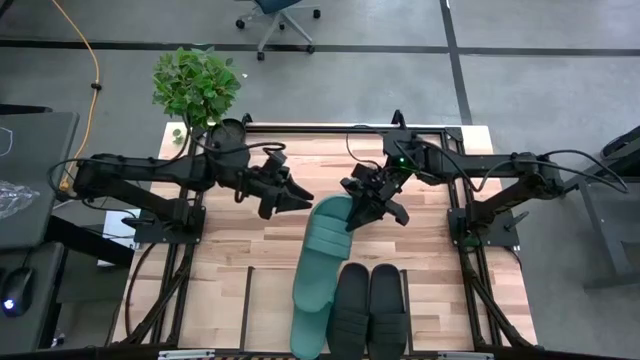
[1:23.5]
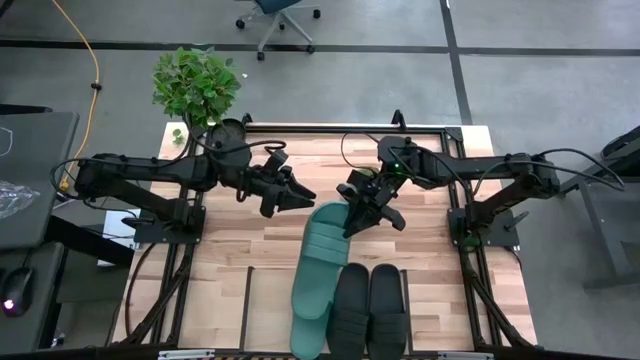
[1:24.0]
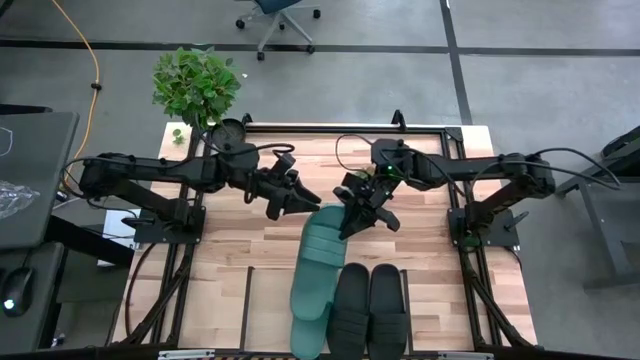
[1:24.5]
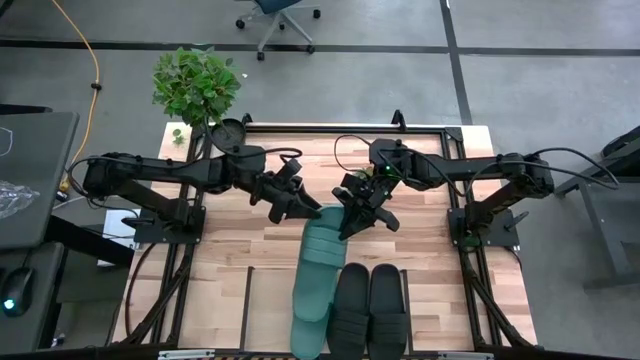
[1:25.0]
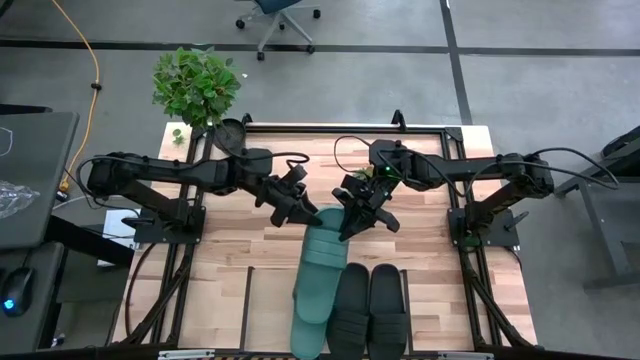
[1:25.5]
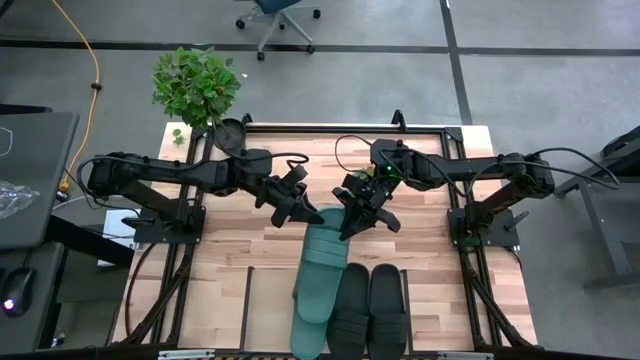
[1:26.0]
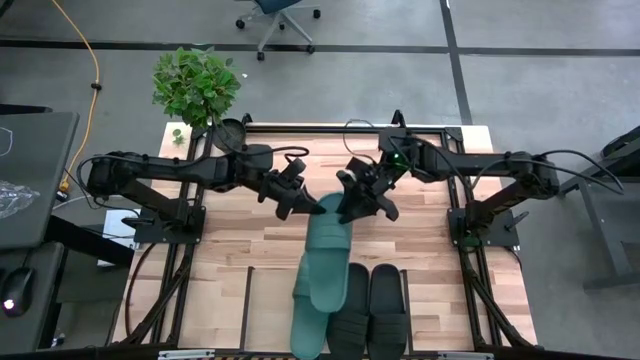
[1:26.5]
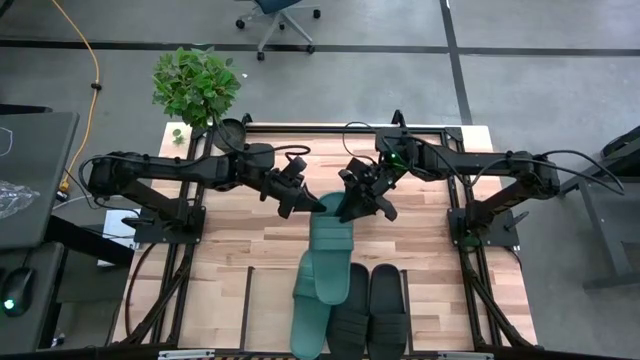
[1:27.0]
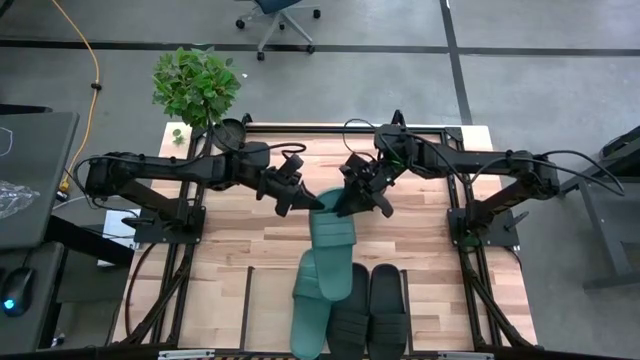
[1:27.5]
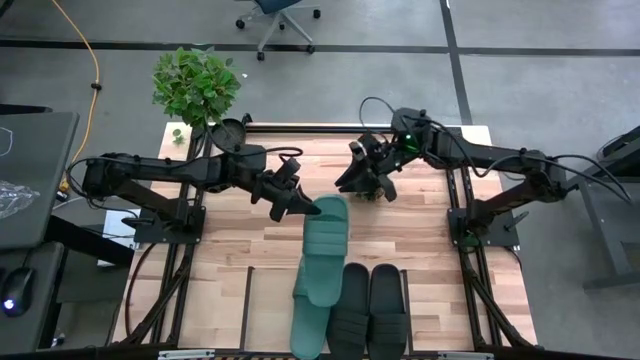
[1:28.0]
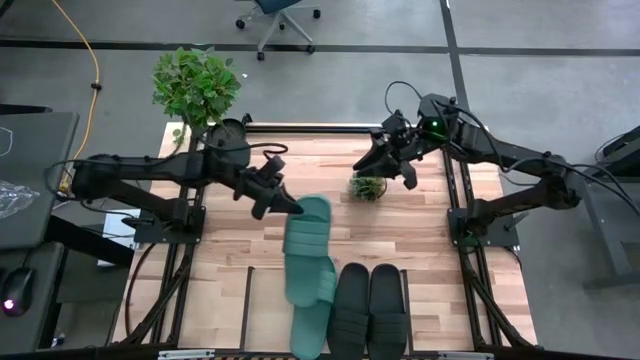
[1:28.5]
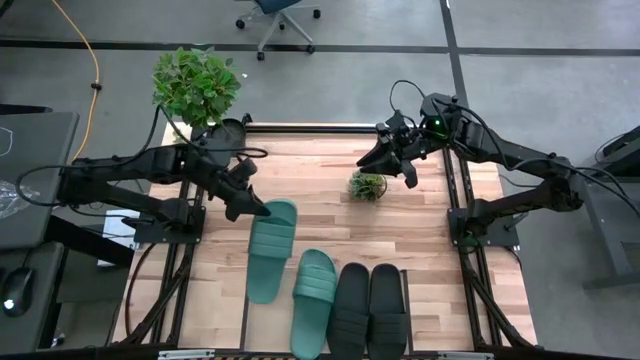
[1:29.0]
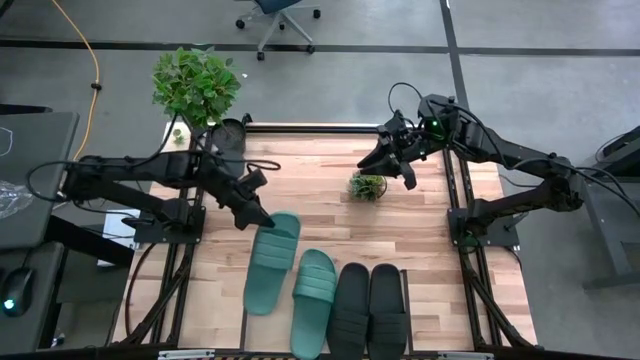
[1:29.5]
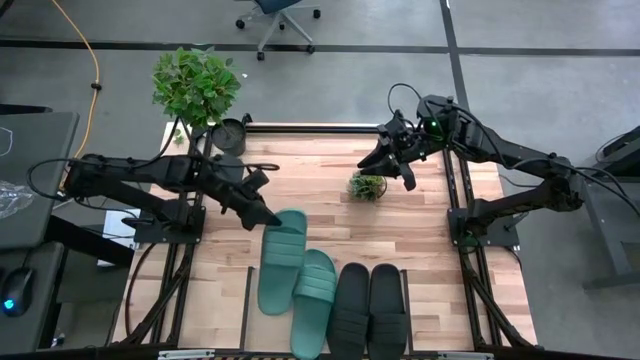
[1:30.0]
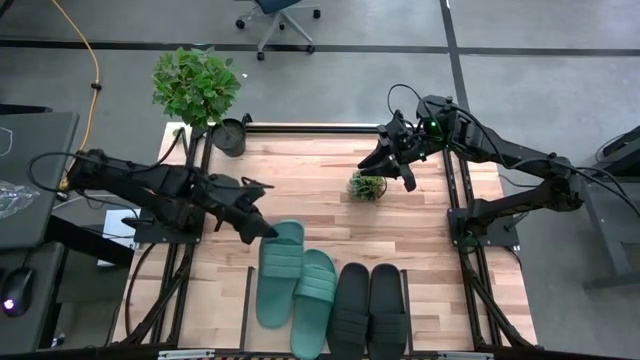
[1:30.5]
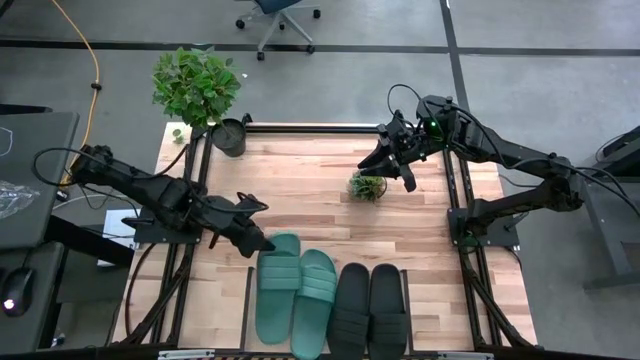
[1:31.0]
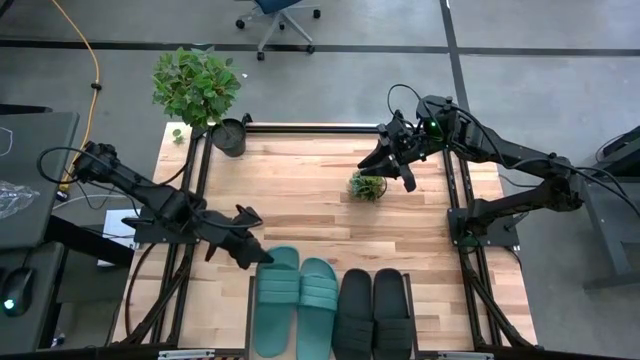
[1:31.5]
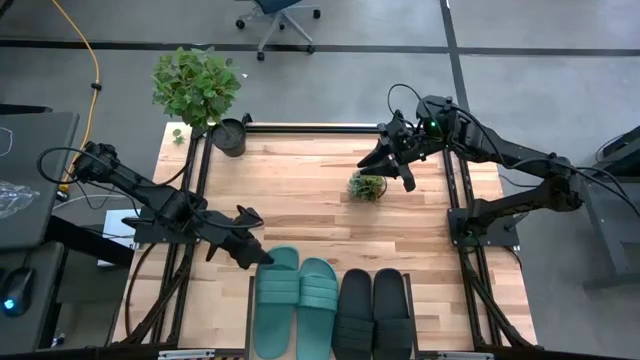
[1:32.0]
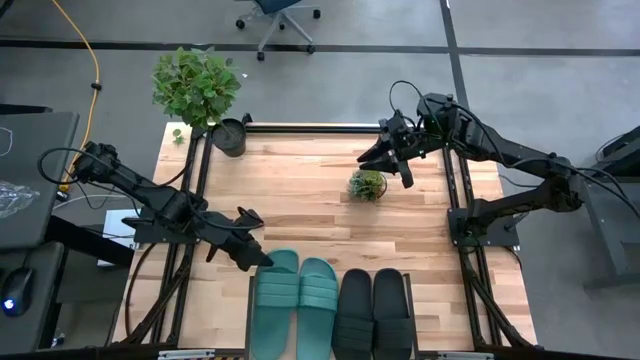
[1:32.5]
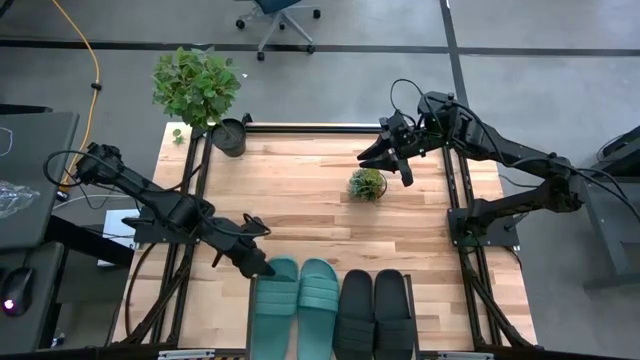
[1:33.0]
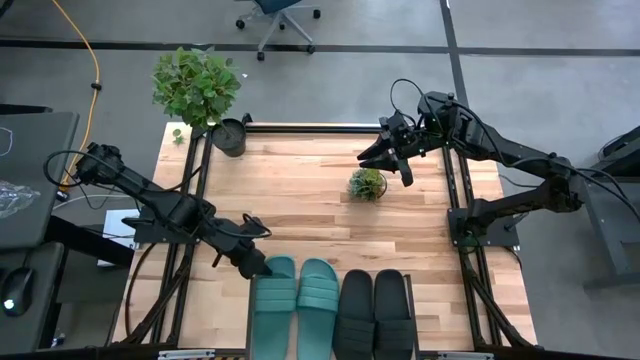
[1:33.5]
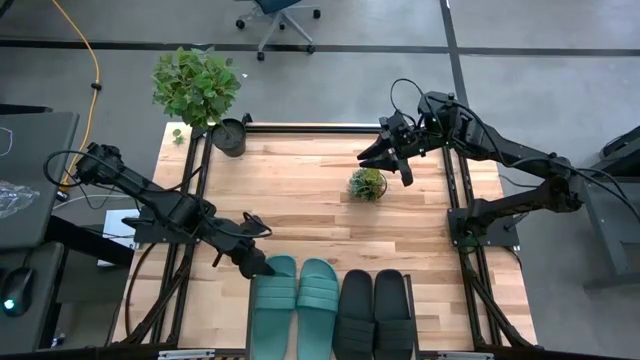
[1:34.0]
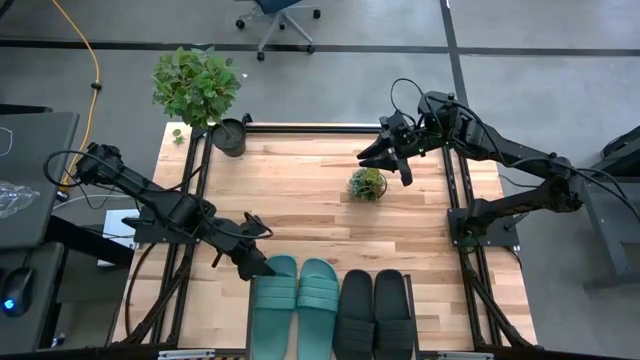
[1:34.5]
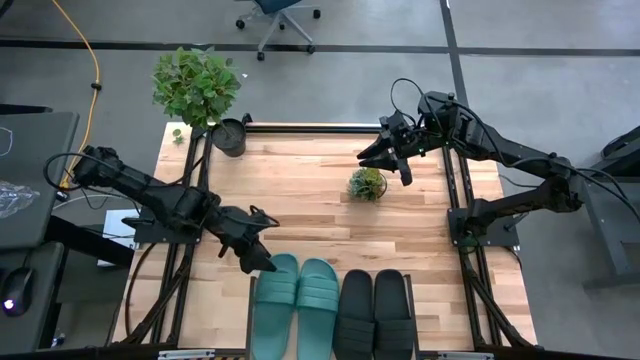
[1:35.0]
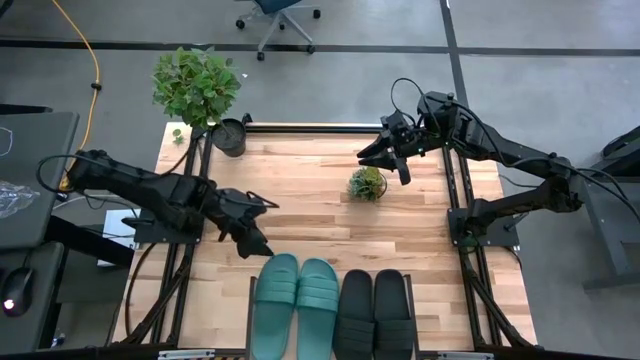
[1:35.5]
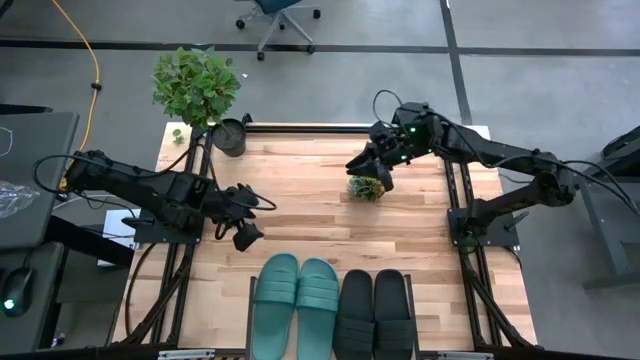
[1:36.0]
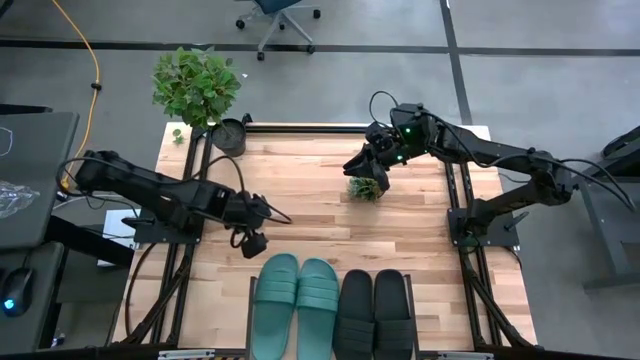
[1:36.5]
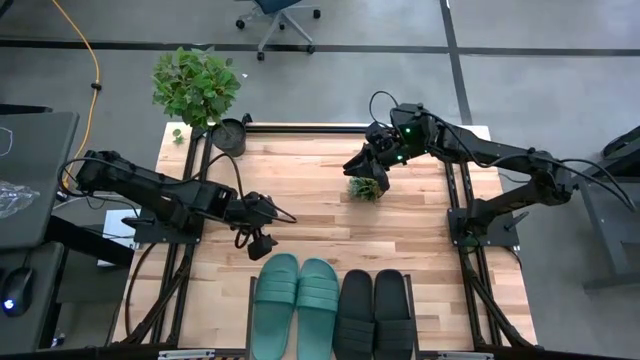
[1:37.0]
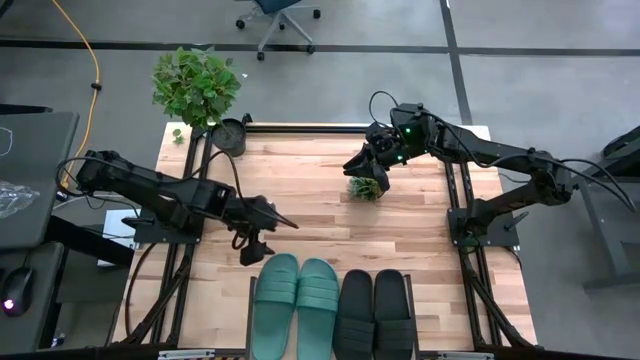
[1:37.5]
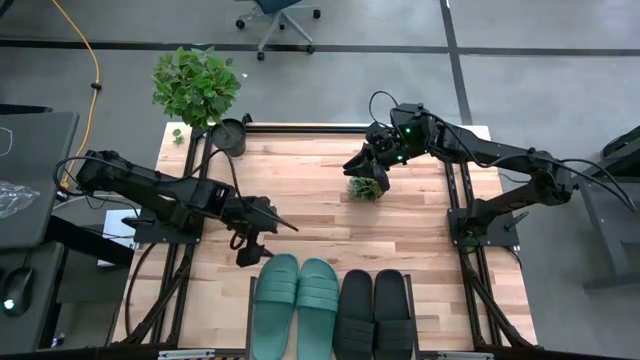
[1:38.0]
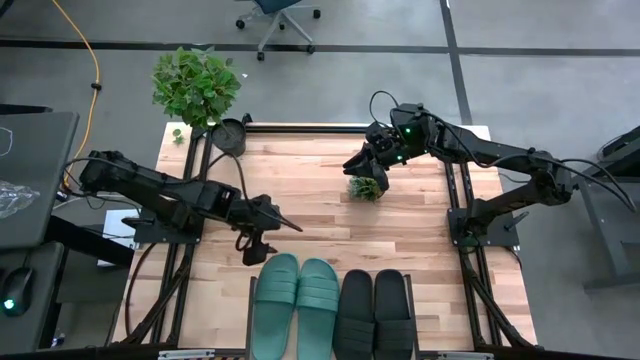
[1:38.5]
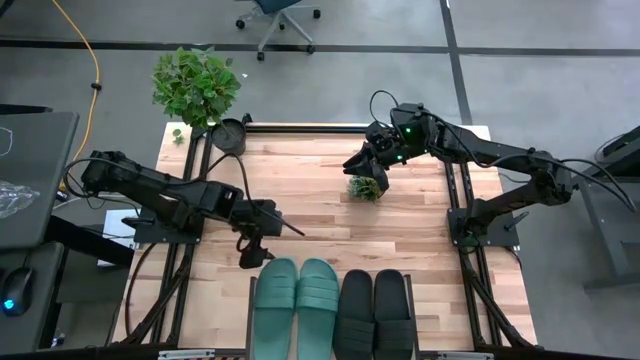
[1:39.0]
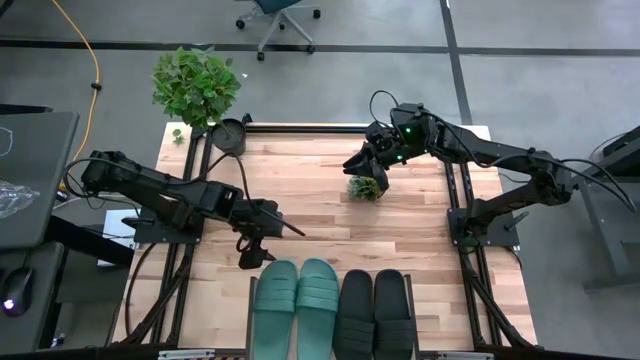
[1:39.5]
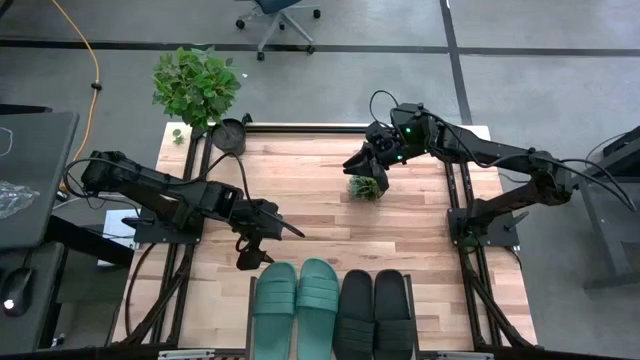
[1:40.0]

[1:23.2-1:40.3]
Task: Pick and place slides into the shelf
Put the blue slide on the shelf
